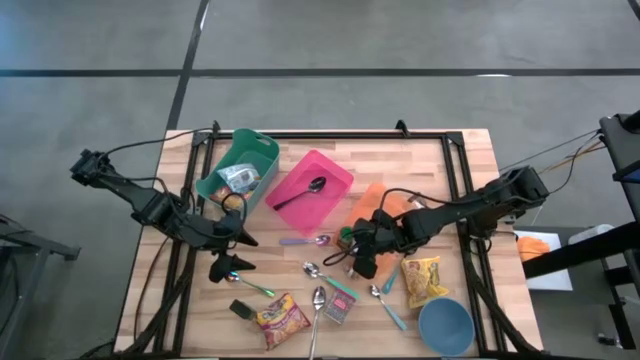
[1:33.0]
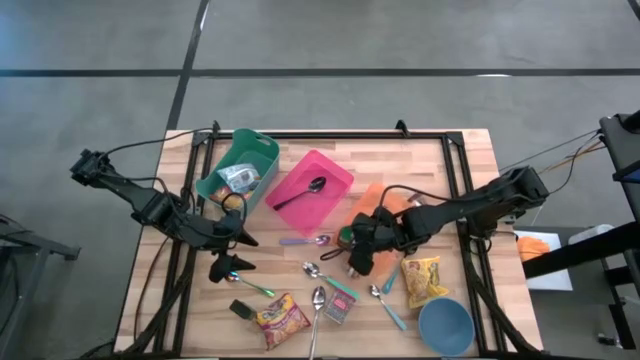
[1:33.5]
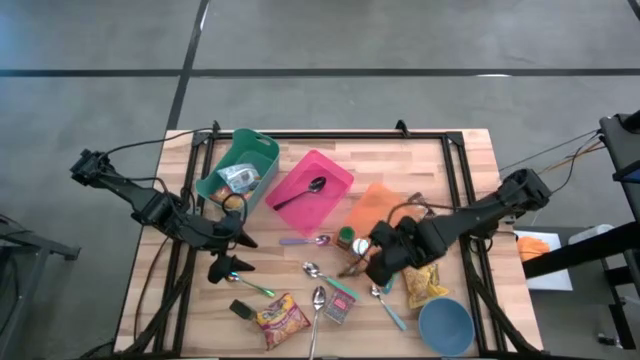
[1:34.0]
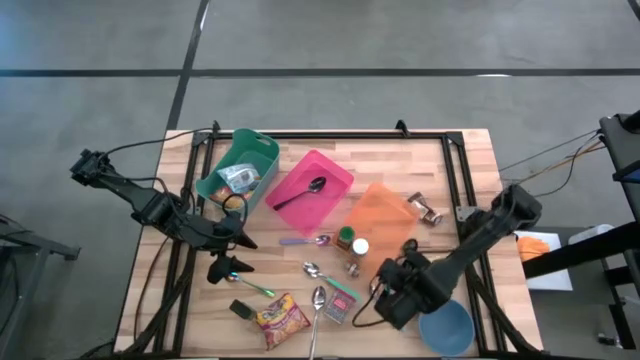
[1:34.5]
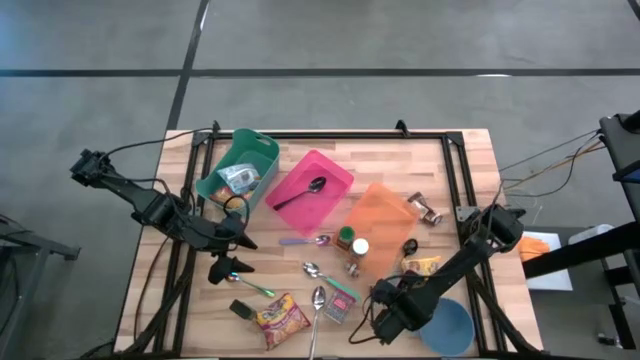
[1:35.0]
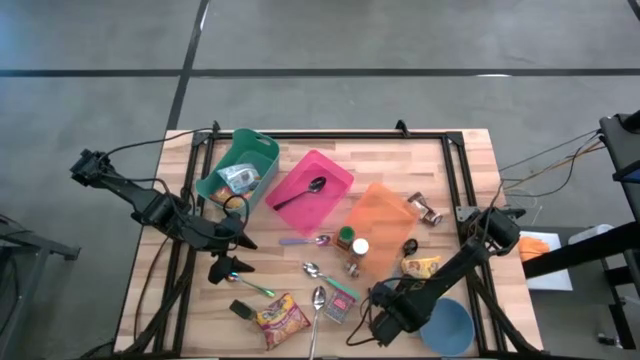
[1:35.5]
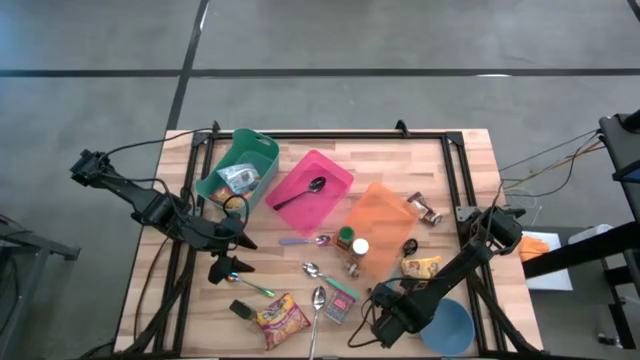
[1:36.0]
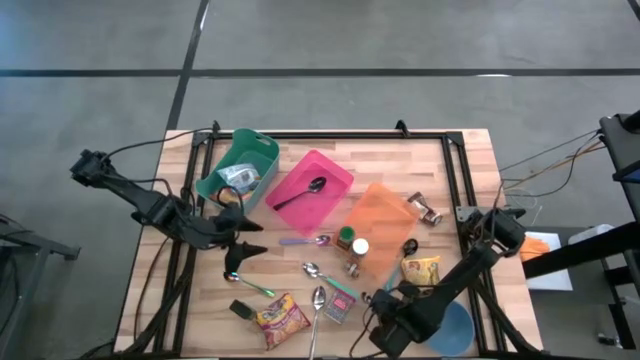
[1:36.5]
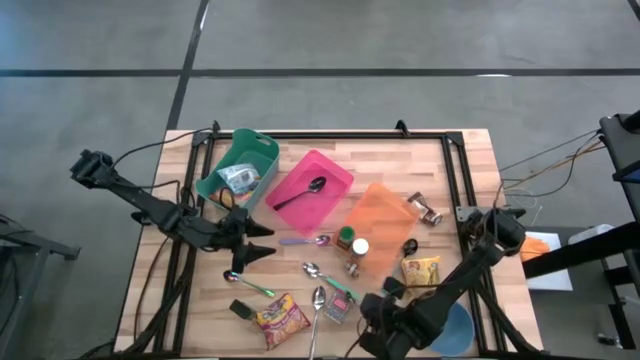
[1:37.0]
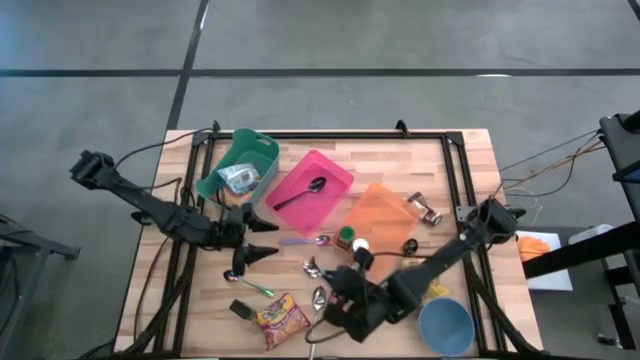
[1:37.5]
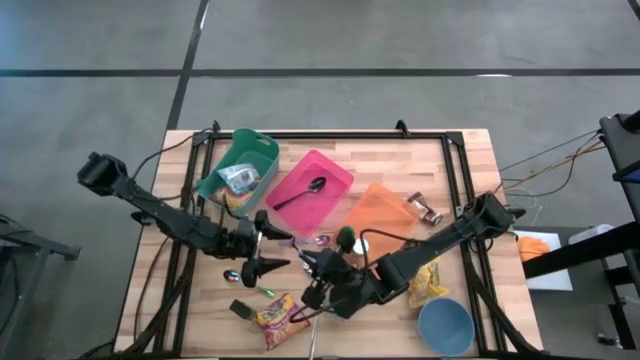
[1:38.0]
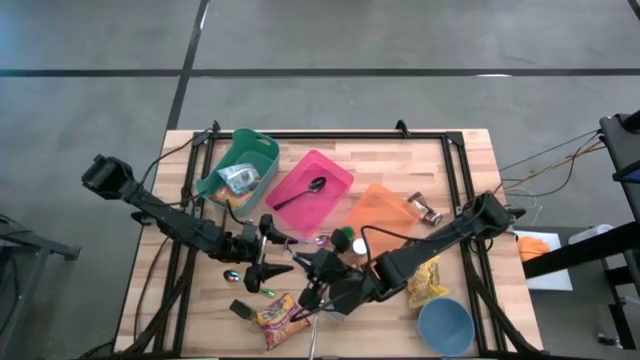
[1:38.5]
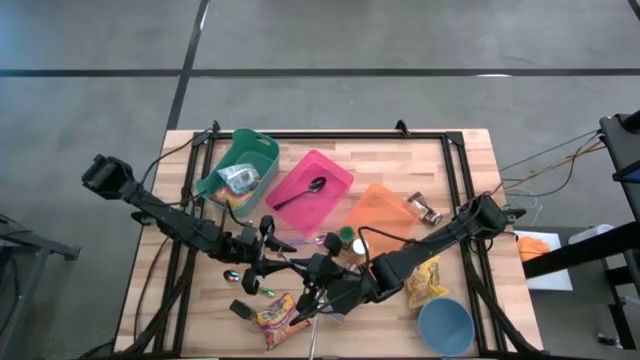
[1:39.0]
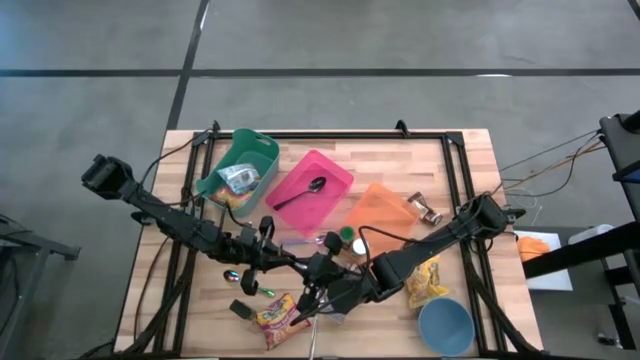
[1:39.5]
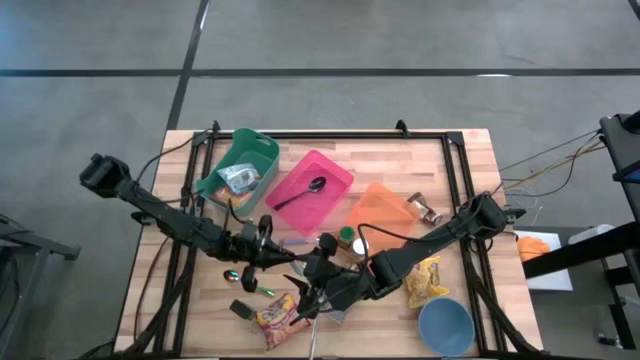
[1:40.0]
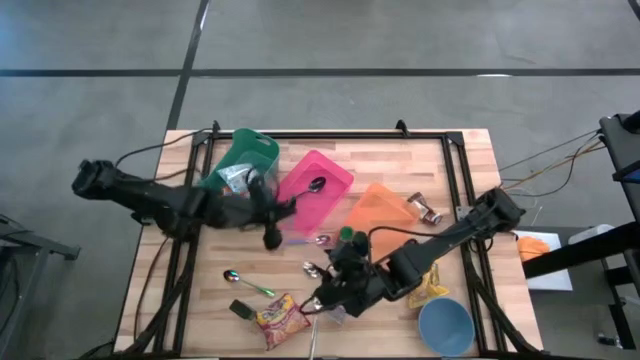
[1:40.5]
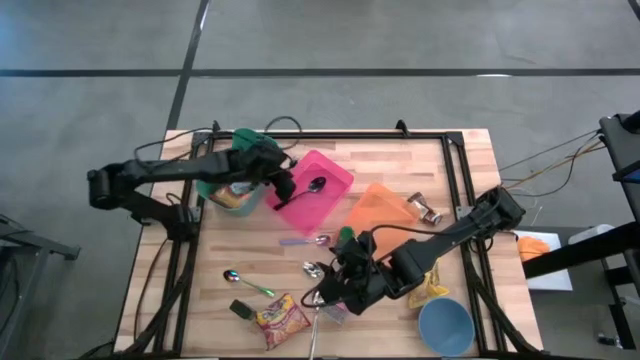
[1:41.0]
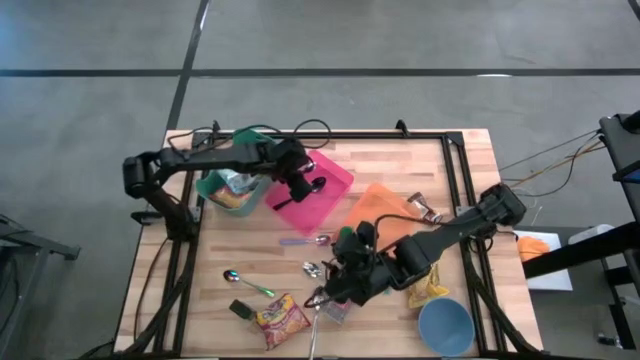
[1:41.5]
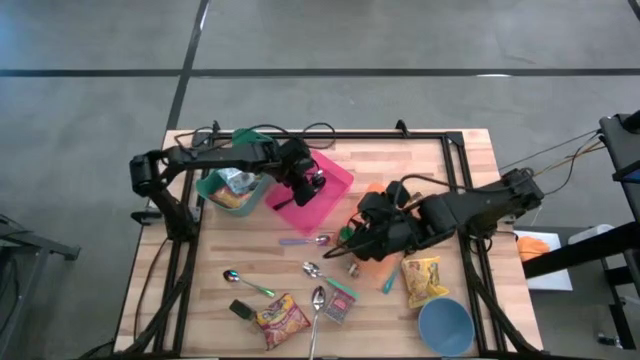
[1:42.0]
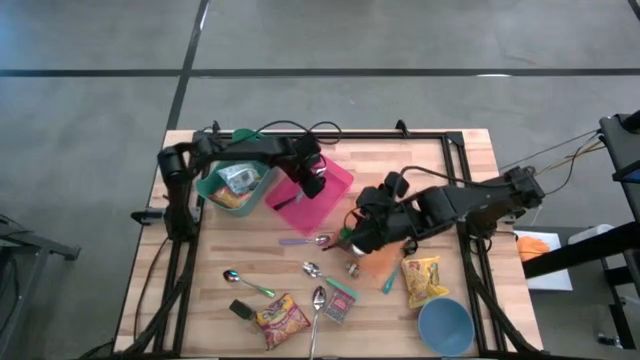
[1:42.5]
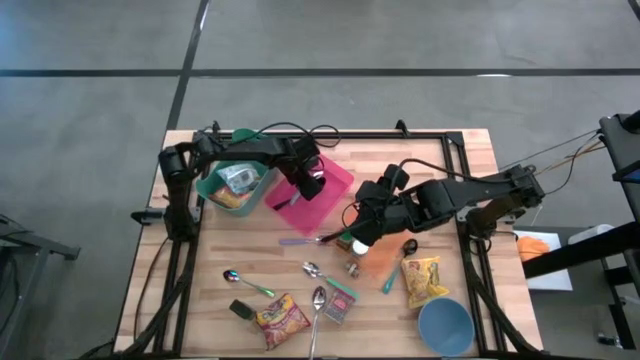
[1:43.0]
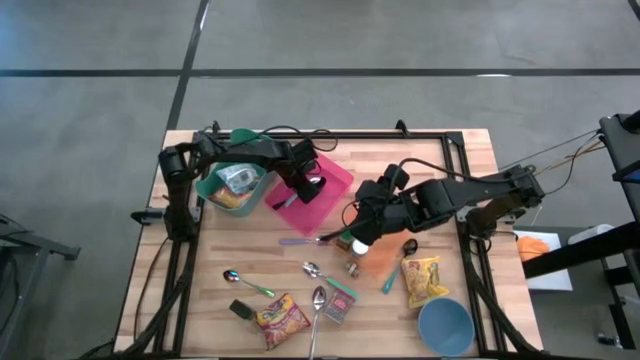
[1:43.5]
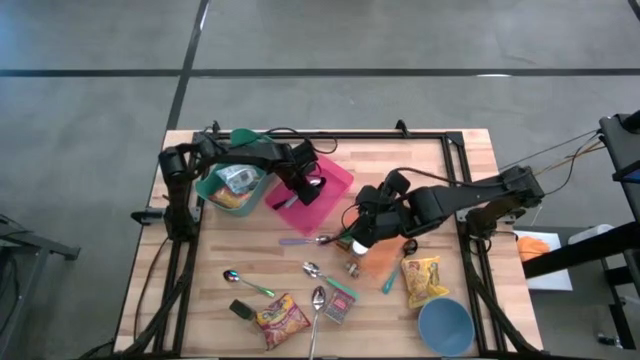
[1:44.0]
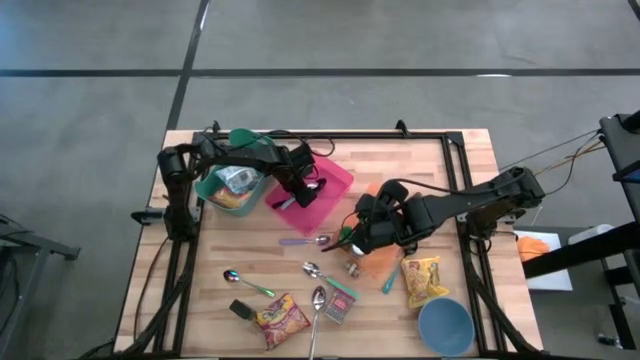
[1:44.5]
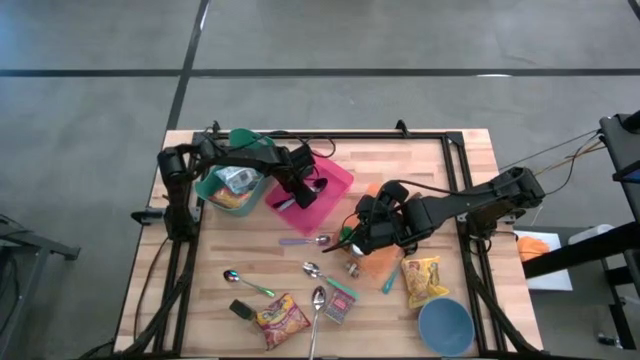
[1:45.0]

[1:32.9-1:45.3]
Put the light blue spoon into the pink bin

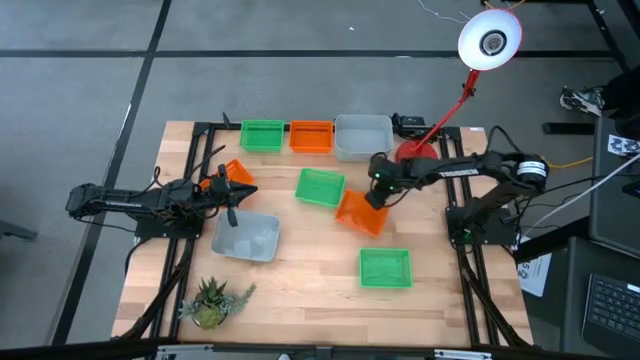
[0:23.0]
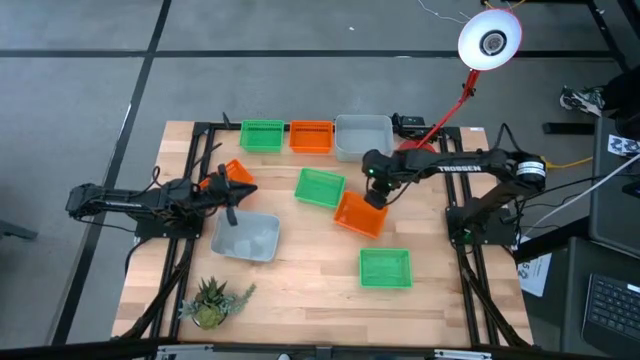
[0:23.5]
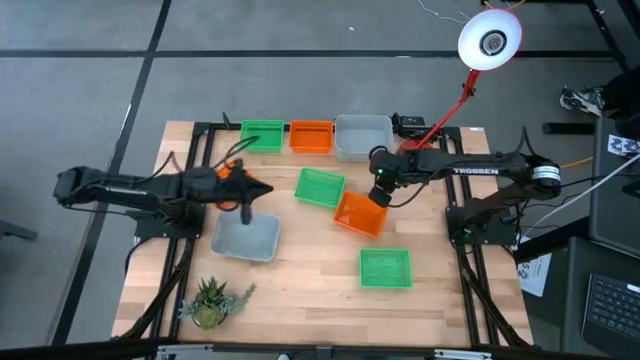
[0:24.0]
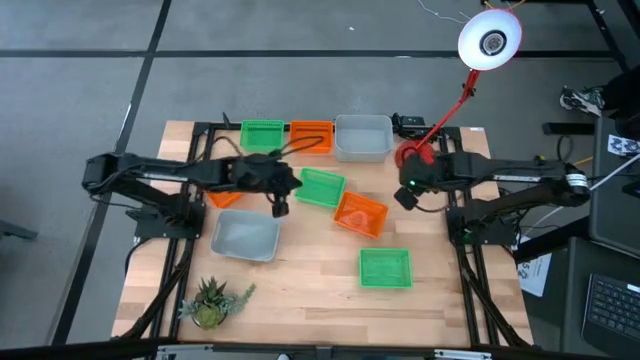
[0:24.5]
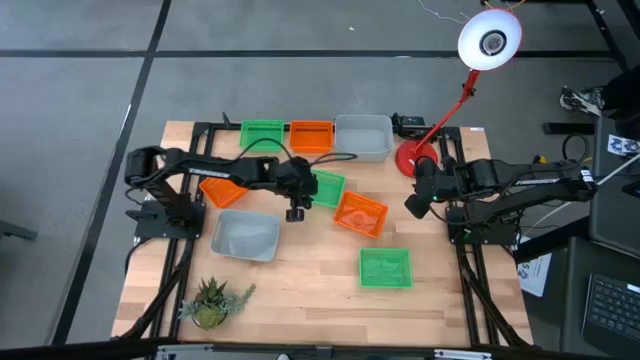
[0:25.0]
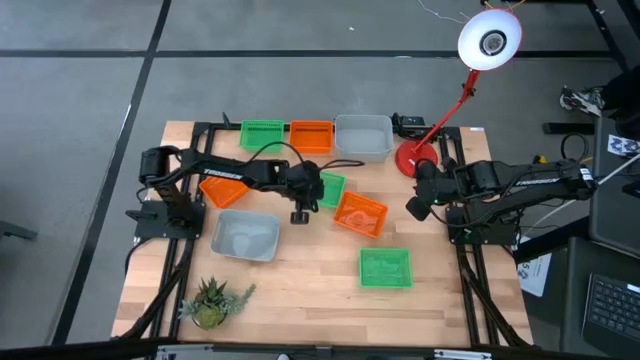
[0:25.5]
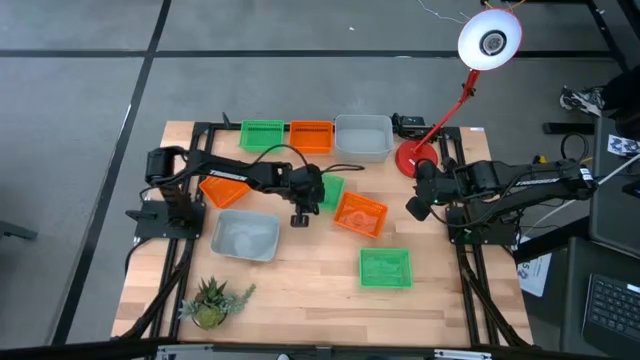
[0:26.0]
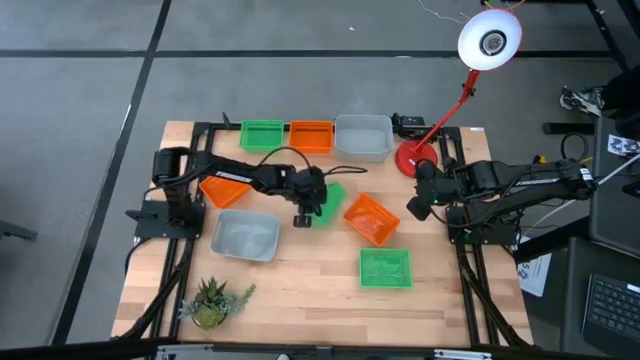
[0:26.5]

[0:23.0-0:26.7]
Stack the middle green bin on top of the top green bin

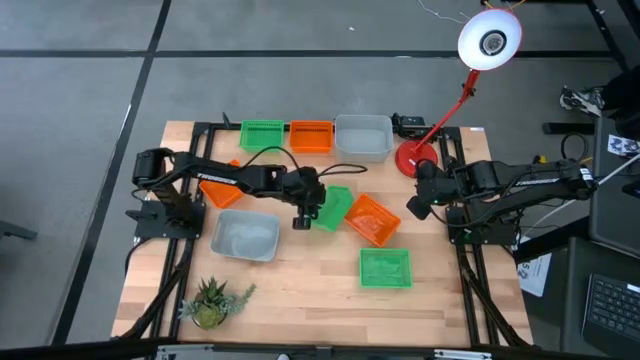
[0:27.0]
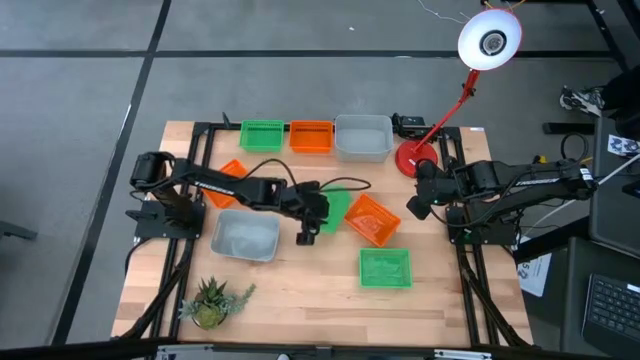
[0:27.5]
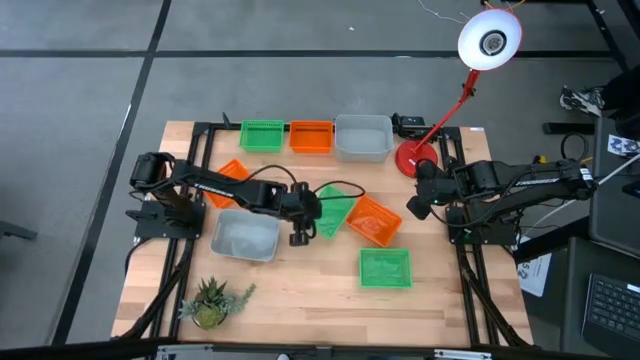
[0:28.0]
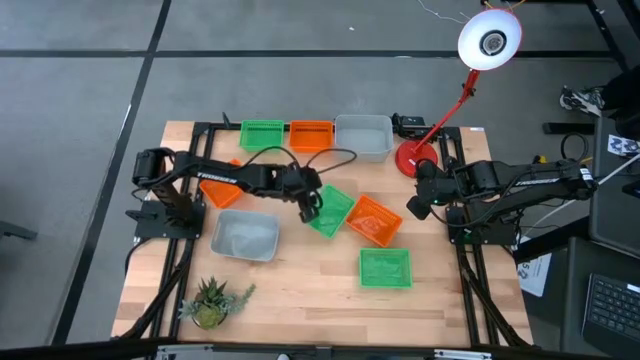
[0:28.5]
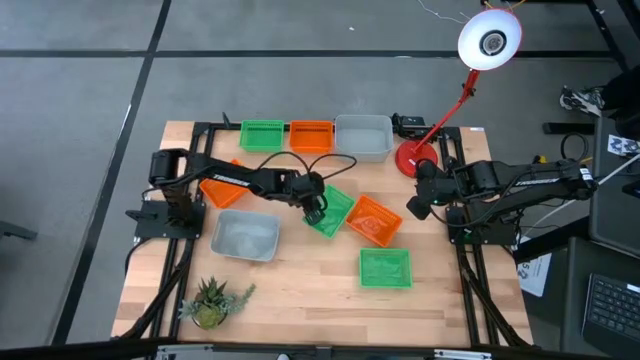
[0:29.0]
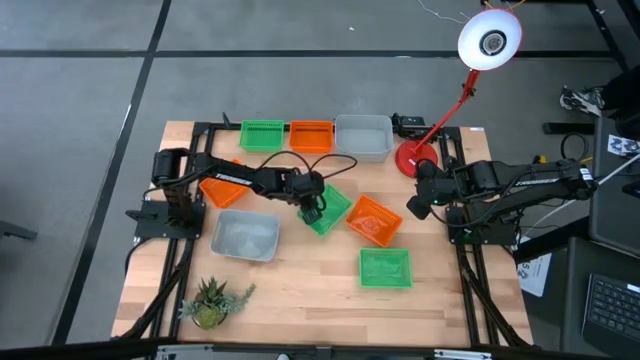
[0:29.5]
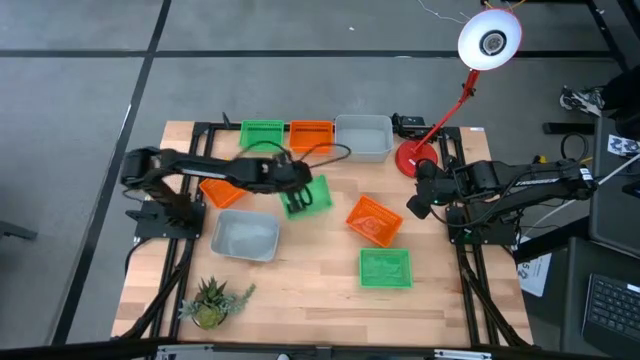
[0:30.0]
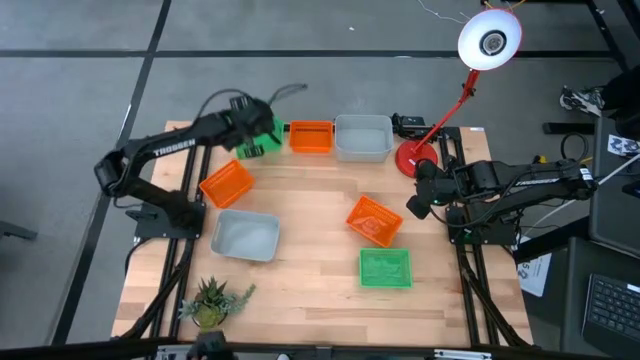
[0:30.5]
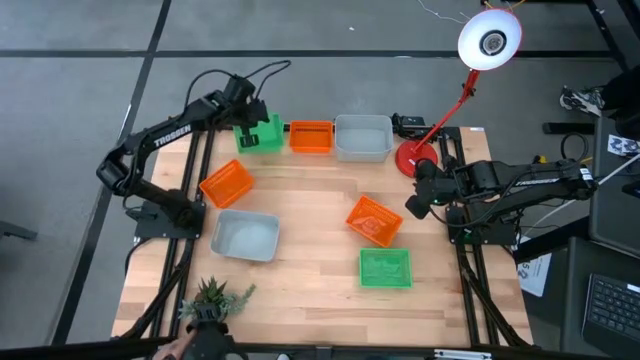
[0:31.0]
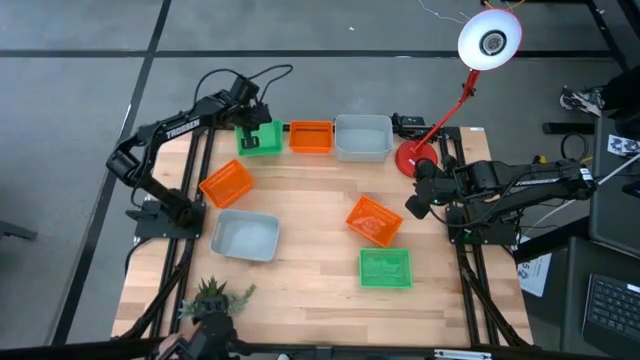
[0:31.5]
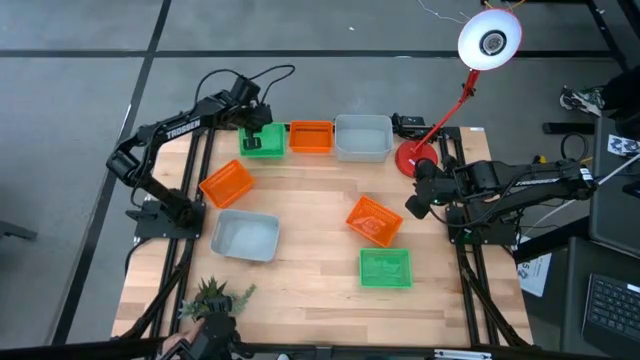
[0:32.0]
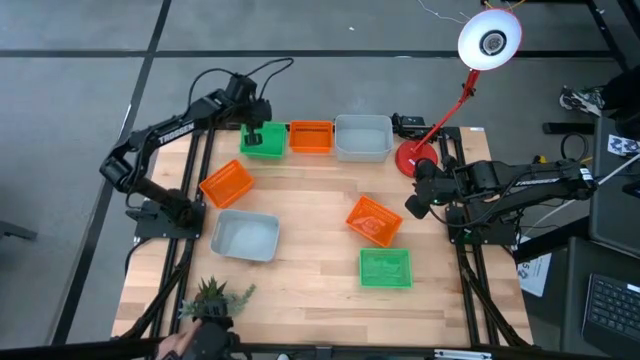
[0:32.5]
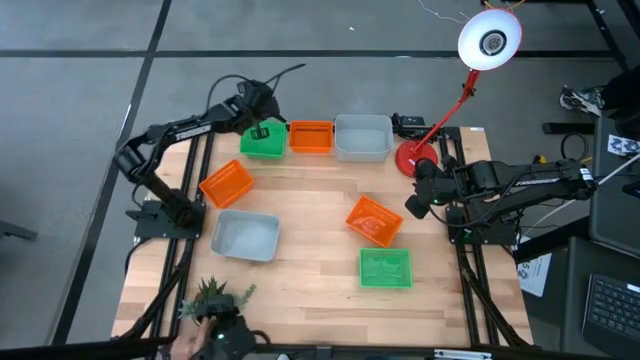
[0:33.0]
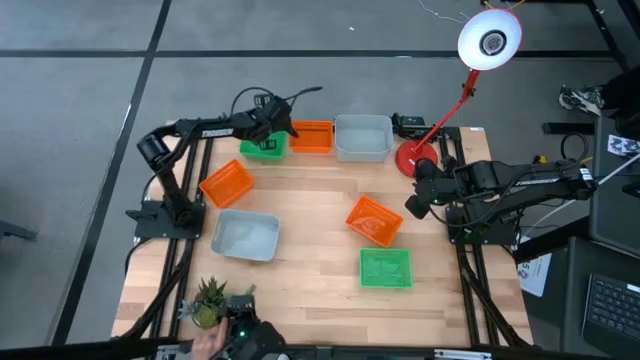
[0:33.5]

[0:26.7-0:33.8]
Stack the middle green bin on top of the top green bin
